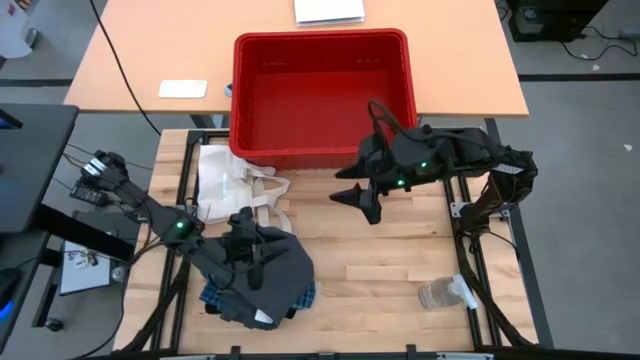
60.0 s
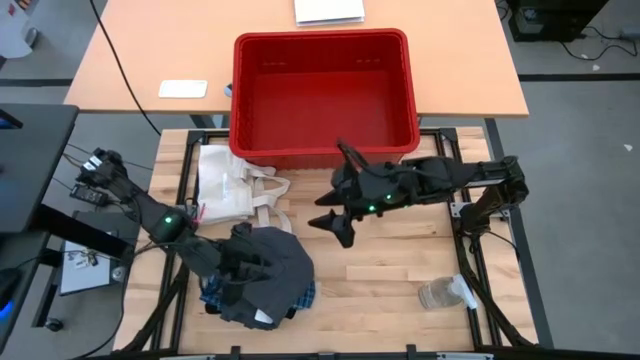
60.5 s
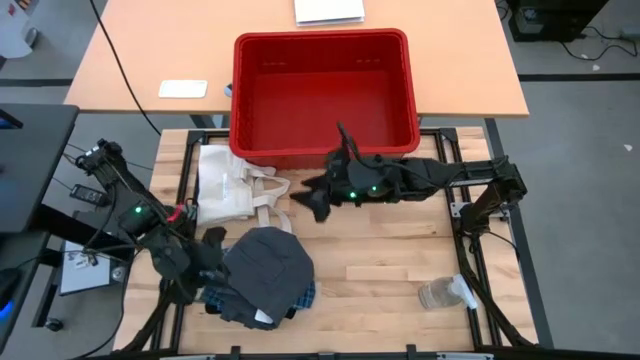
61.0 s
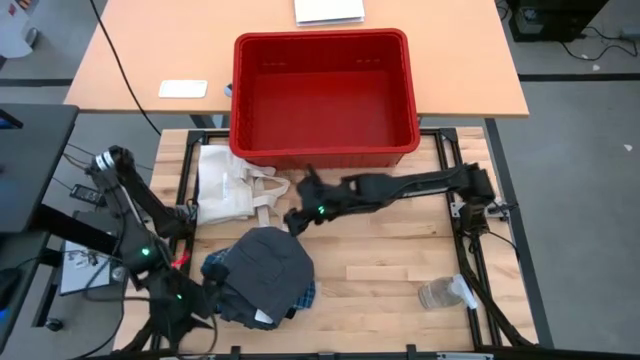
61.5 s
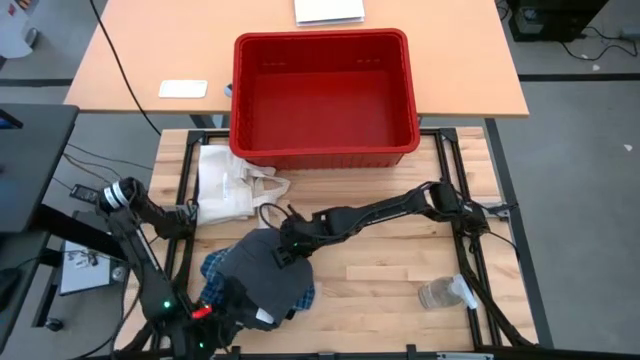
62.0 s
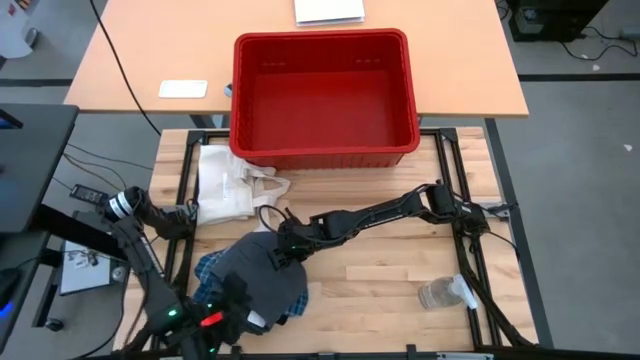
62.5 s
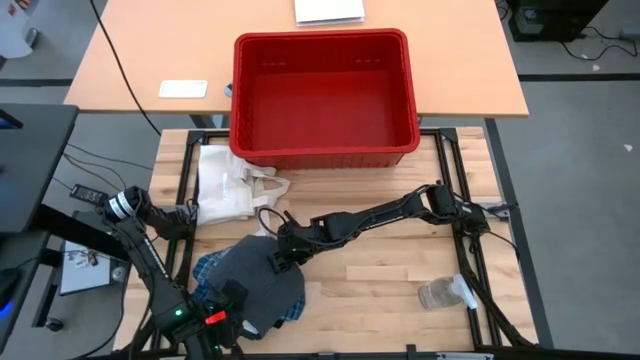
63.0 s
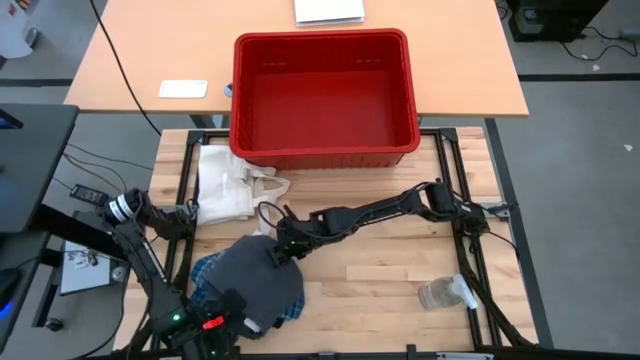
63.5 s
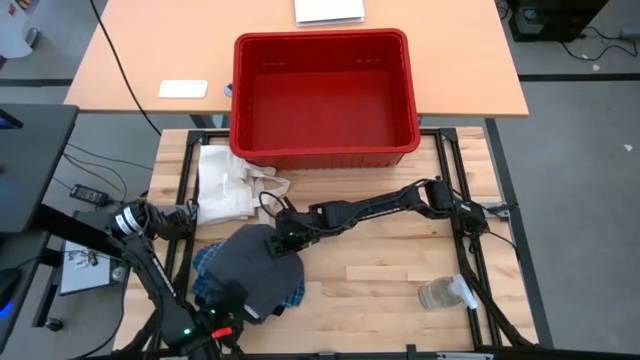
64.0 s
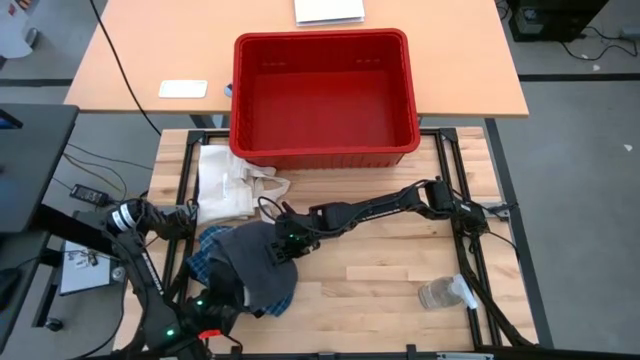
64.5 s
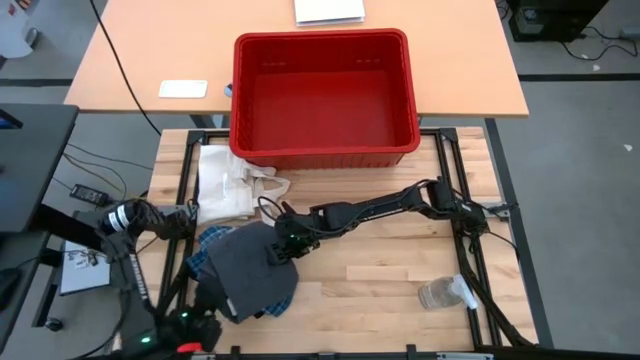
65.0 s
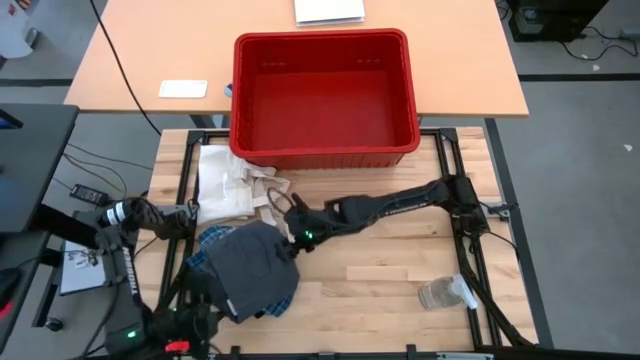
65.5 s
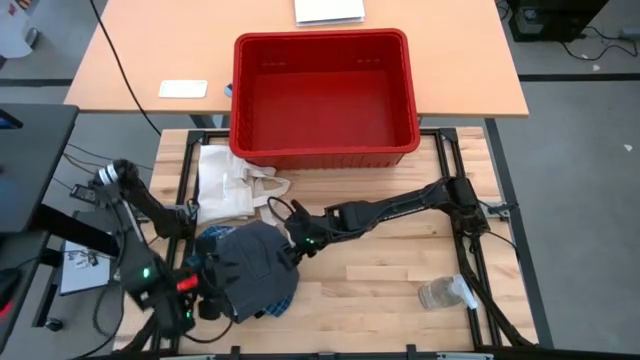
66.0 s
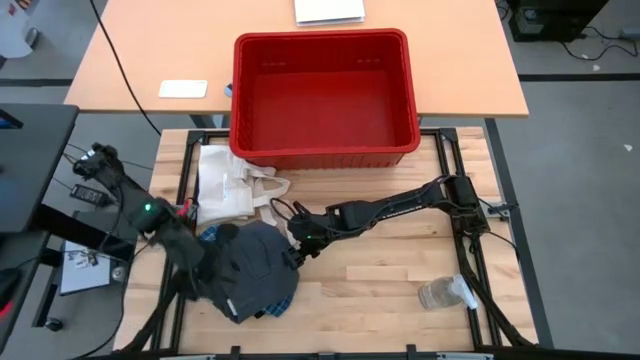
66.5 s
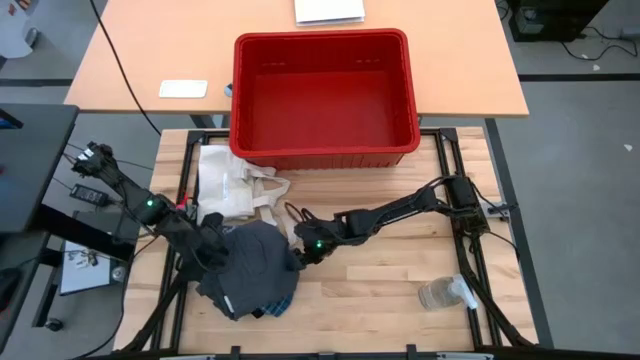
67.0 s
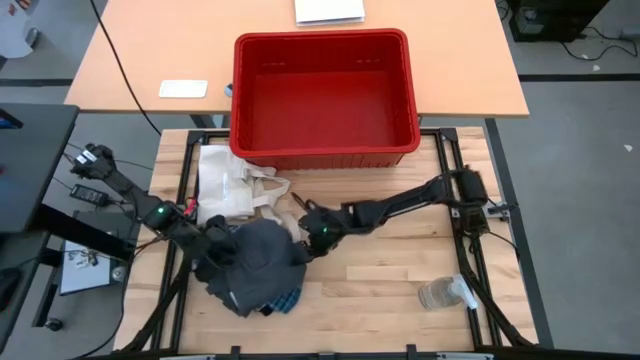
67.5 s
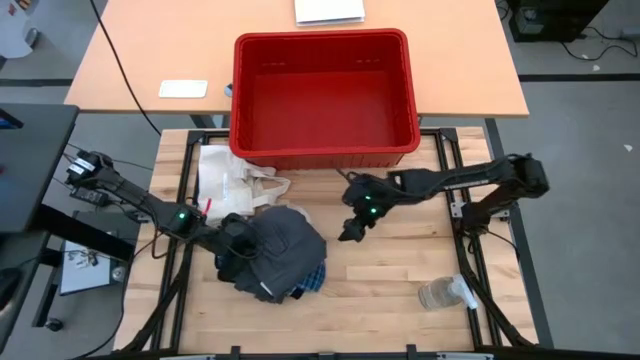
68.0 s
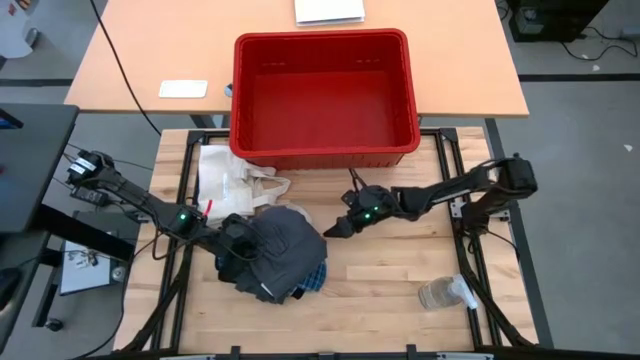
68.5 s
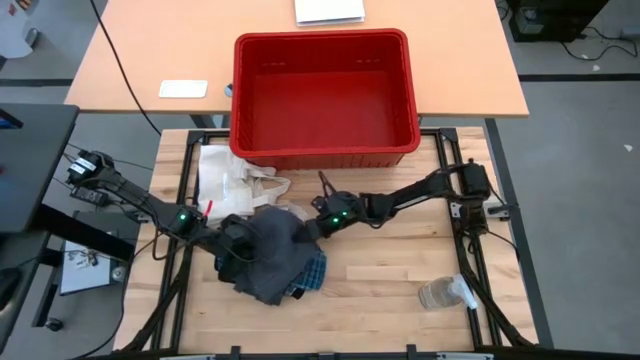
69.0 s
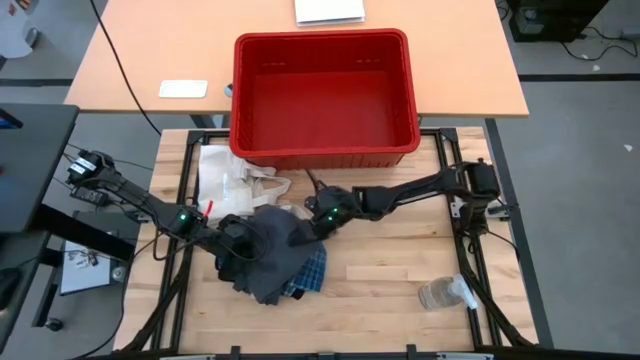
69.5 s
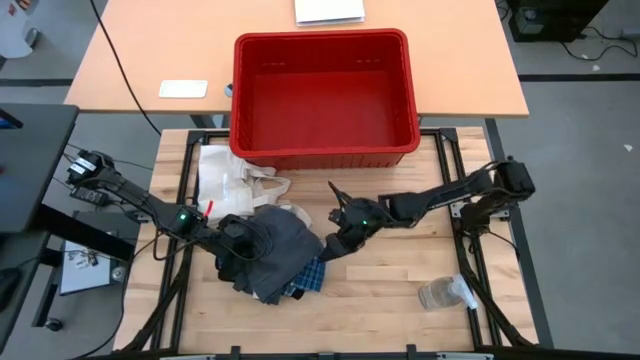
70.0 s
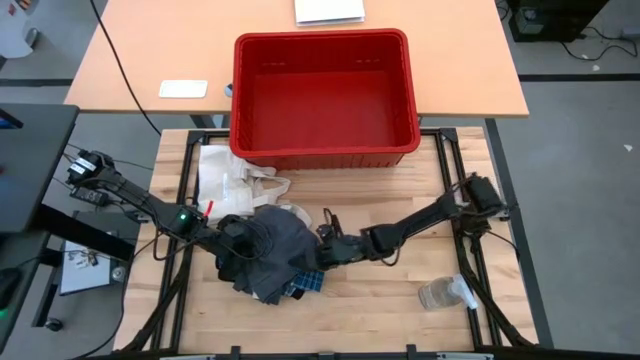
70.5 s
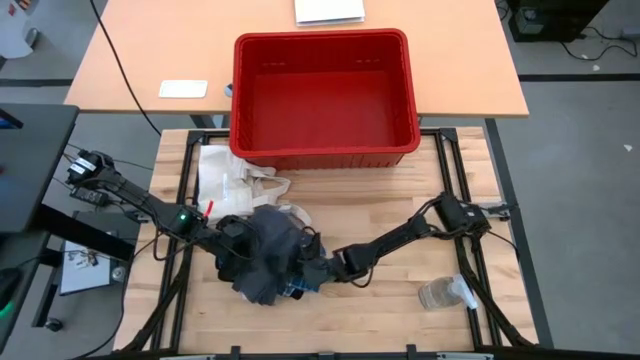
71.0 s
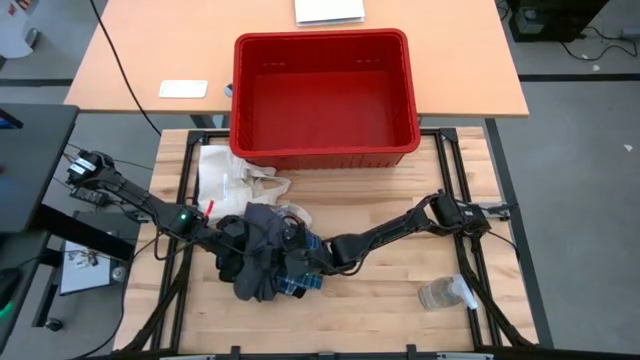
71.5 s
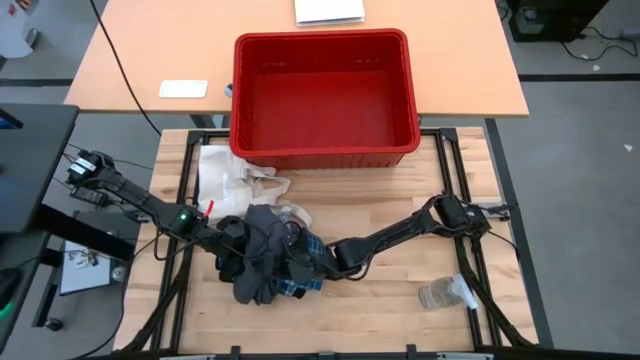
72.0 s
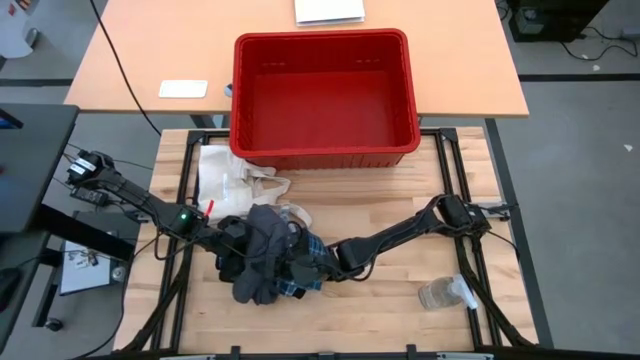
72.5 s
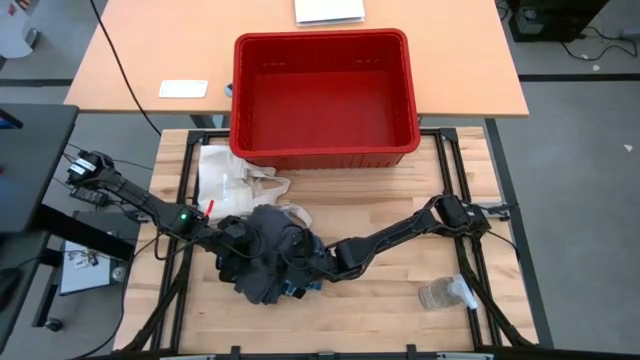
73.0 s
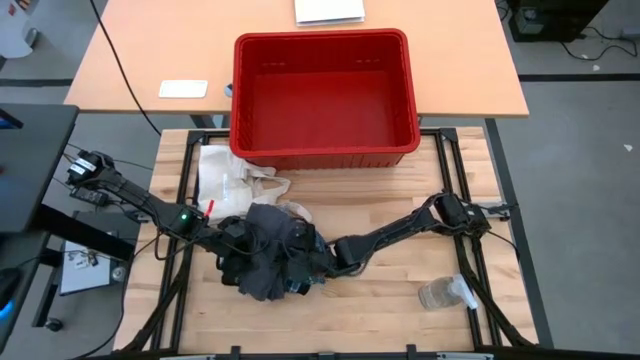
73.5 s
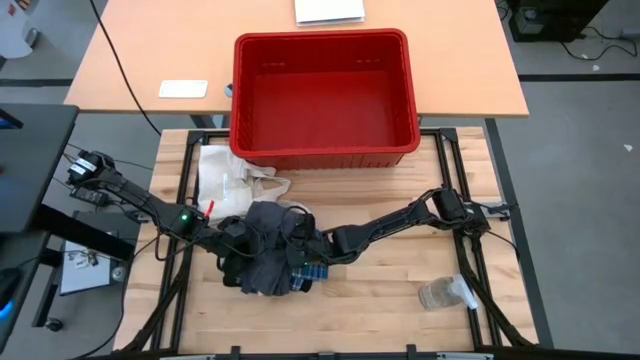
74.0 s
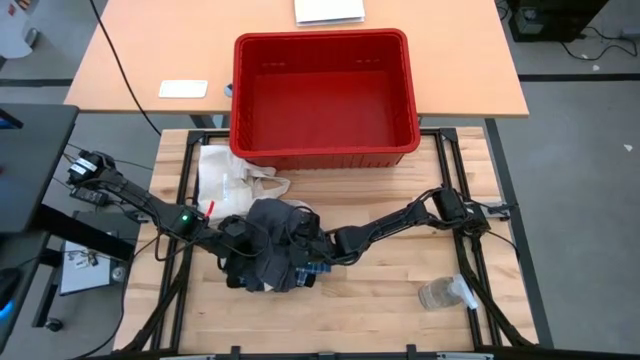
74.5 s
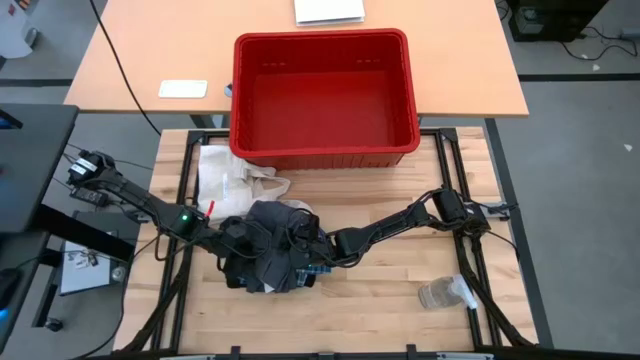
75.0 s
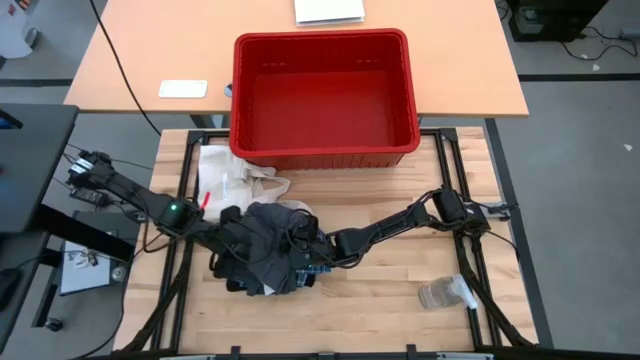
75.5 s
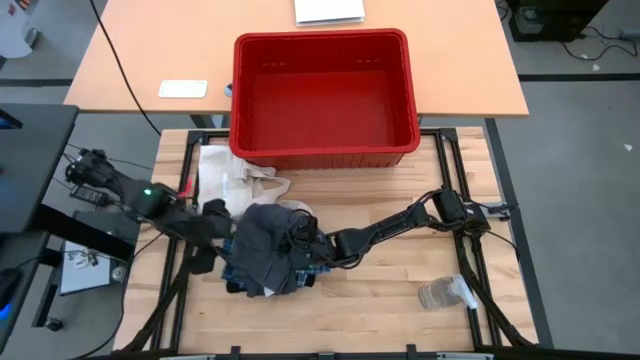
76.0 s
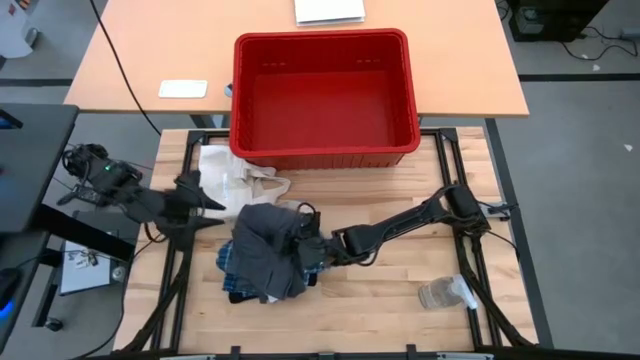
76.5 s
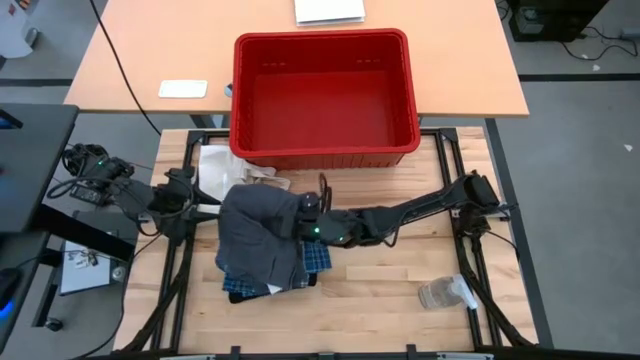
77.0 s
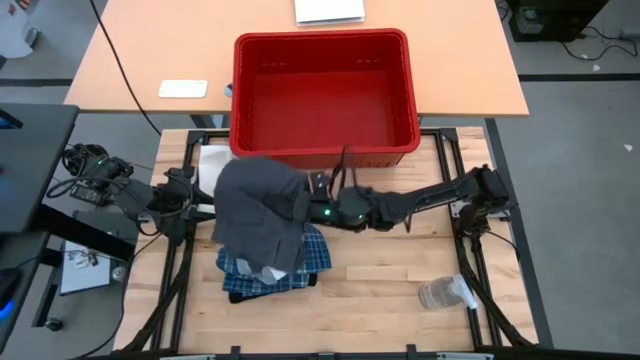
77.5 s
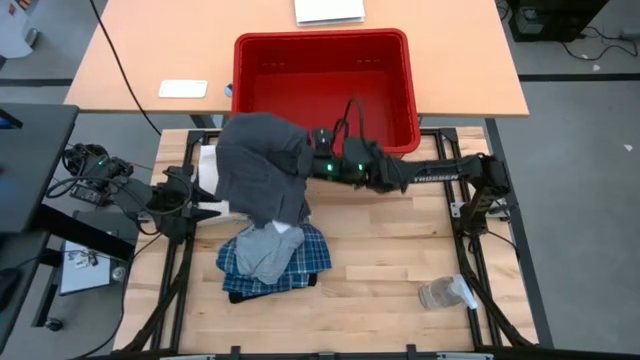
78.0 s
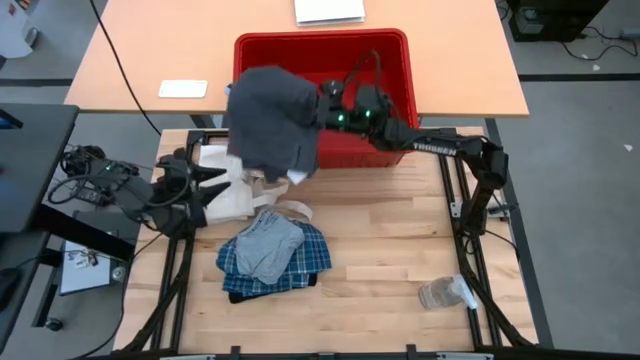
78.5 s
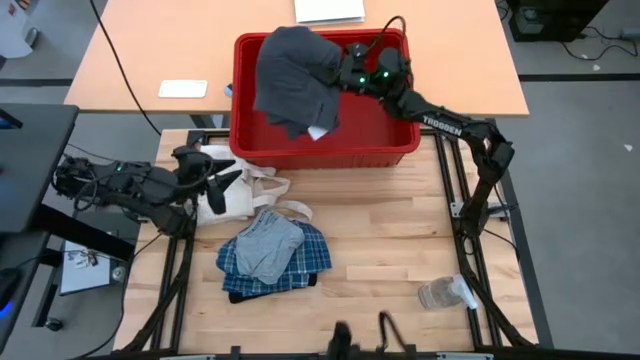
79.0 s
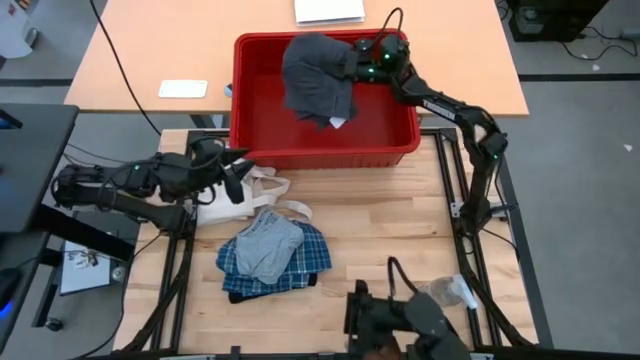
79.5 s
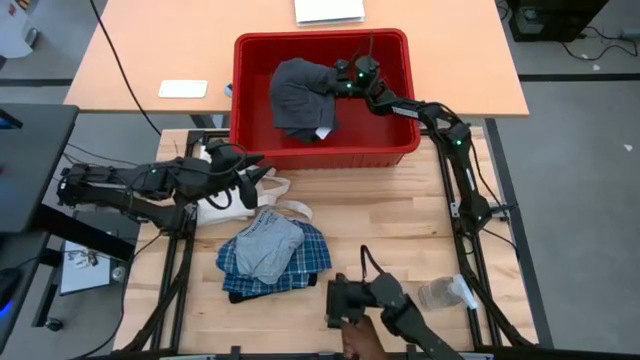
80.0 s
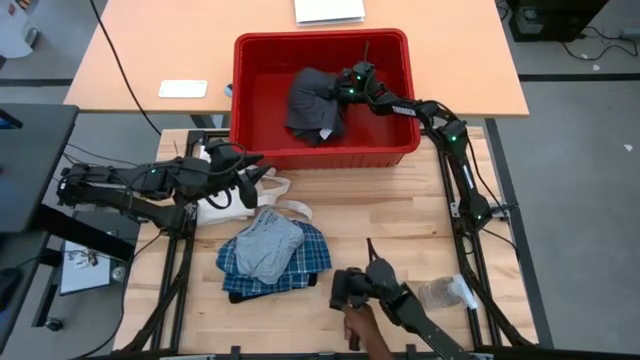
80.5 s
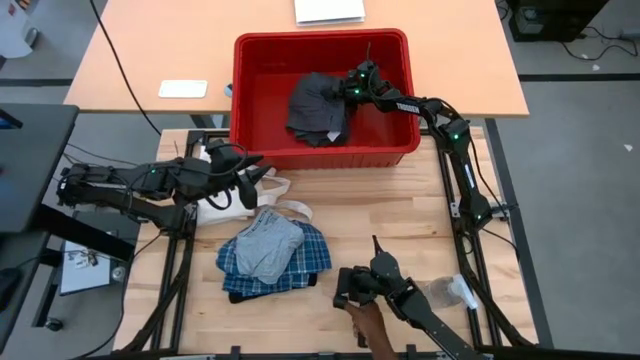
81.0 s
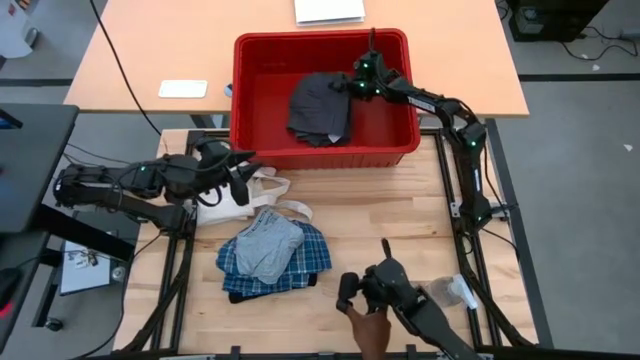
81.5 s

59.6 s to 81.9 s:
Task: Fold laundry
Put the gray shorts into the red bin
